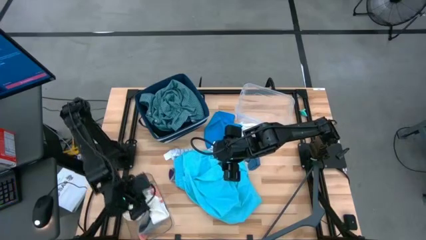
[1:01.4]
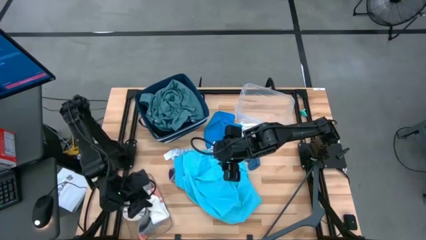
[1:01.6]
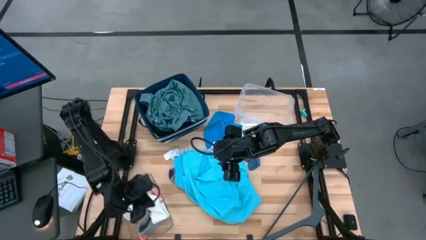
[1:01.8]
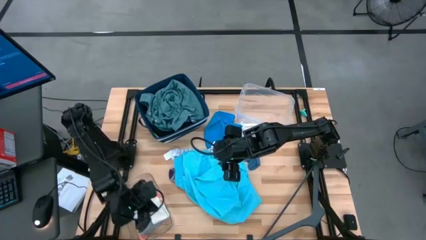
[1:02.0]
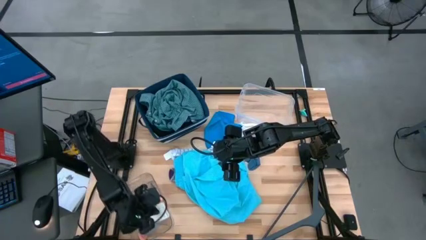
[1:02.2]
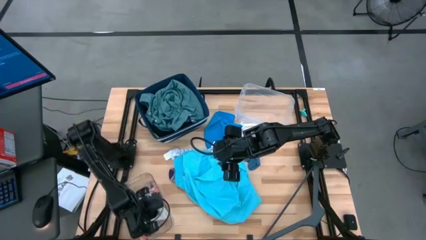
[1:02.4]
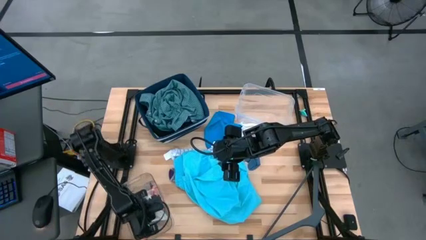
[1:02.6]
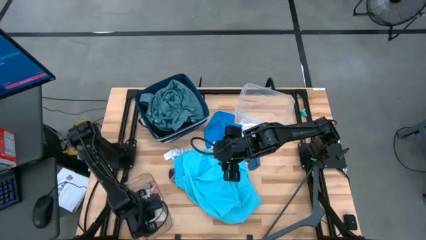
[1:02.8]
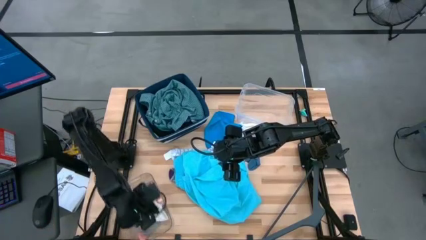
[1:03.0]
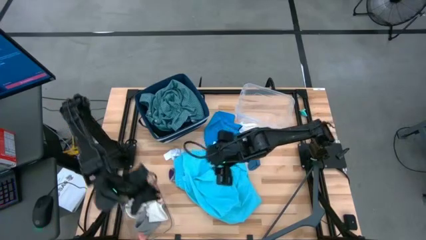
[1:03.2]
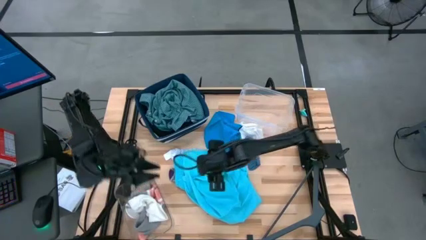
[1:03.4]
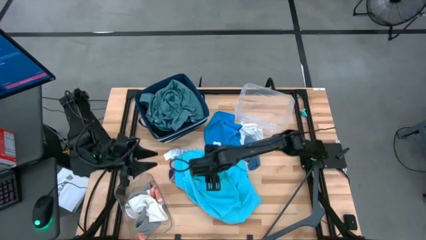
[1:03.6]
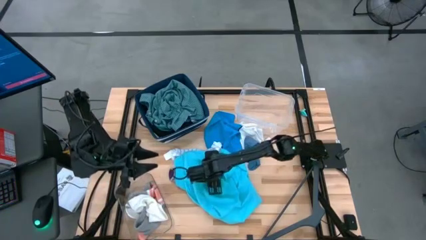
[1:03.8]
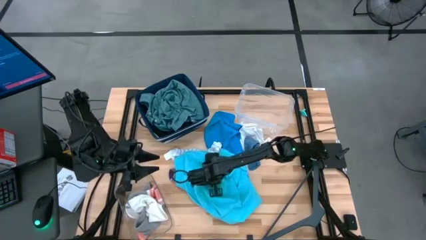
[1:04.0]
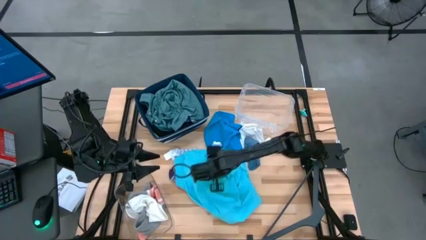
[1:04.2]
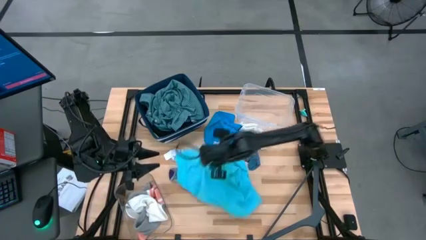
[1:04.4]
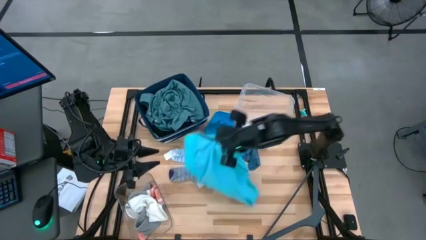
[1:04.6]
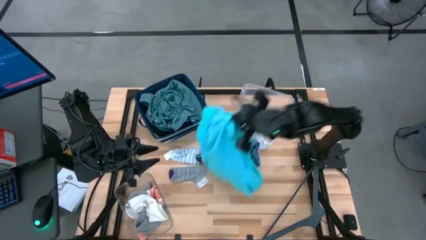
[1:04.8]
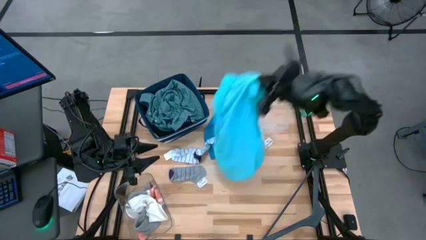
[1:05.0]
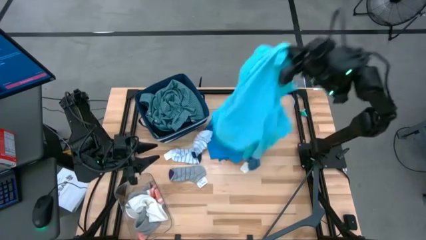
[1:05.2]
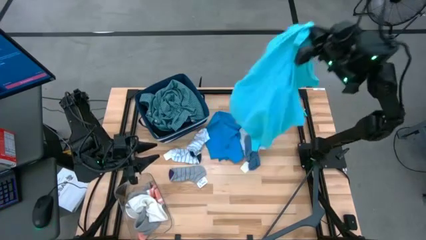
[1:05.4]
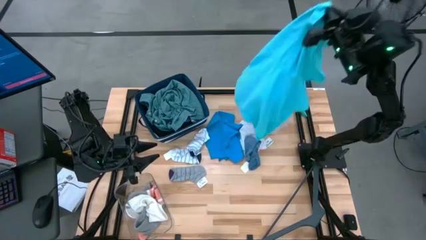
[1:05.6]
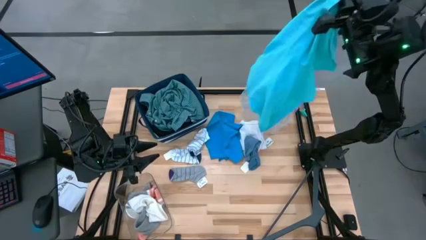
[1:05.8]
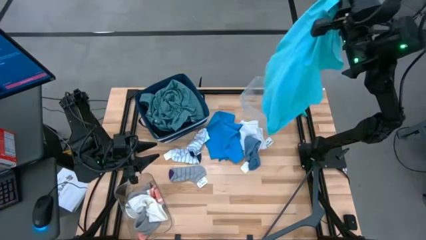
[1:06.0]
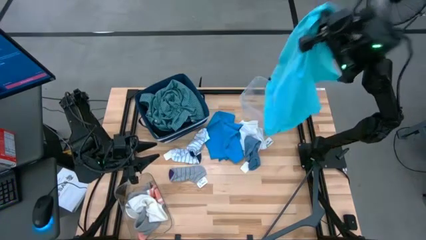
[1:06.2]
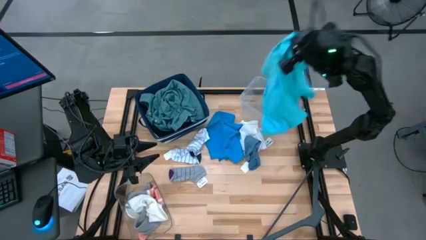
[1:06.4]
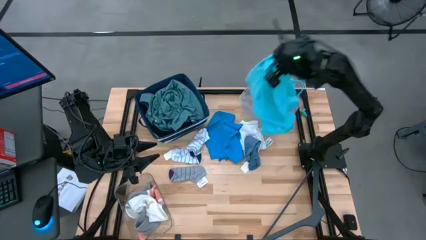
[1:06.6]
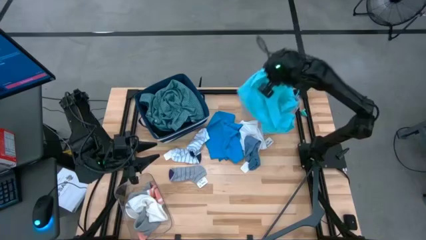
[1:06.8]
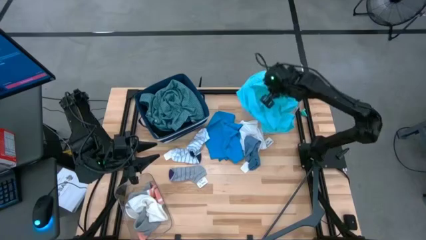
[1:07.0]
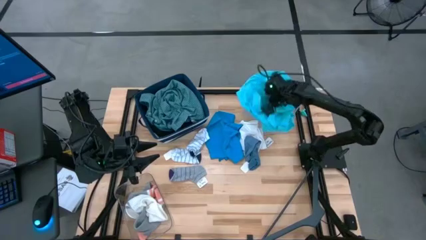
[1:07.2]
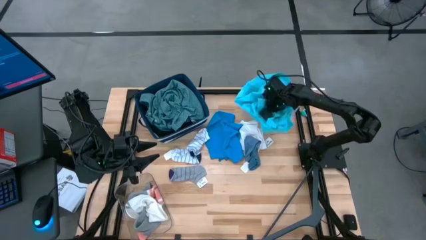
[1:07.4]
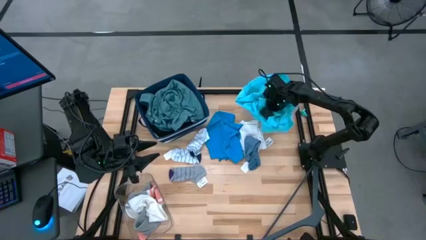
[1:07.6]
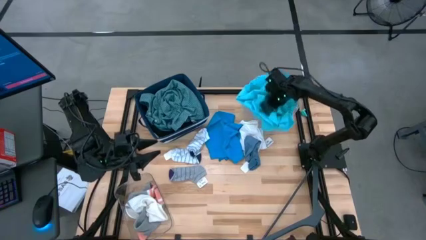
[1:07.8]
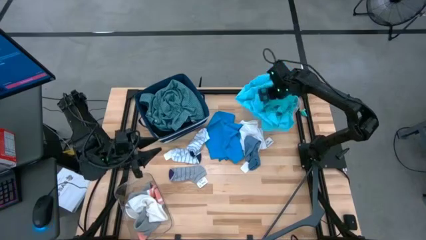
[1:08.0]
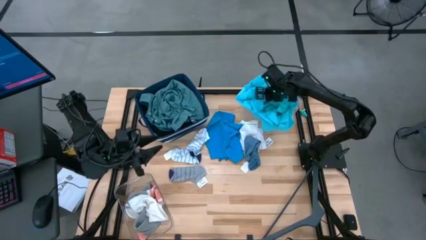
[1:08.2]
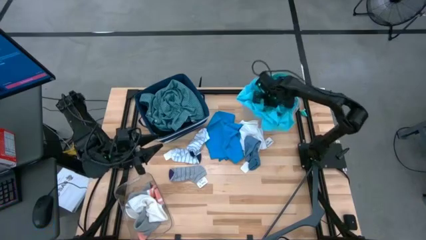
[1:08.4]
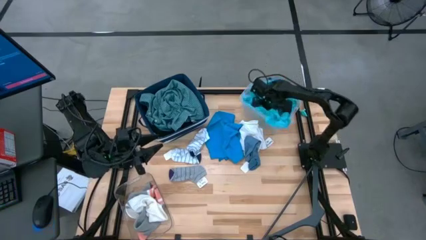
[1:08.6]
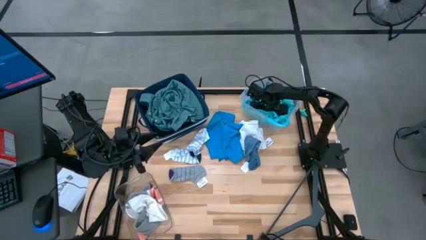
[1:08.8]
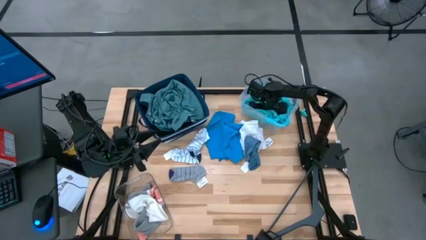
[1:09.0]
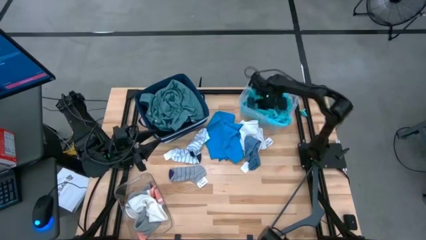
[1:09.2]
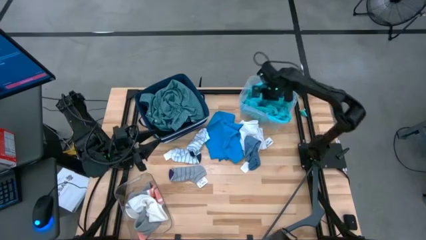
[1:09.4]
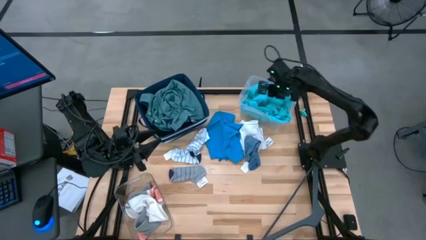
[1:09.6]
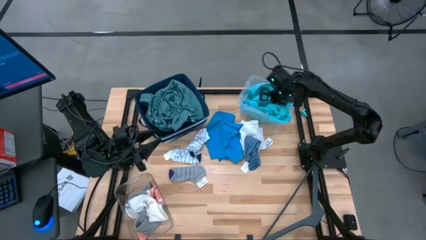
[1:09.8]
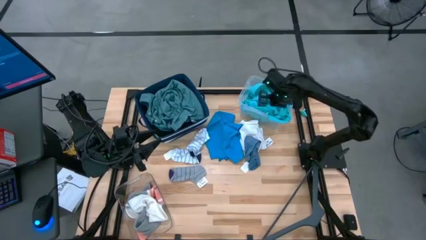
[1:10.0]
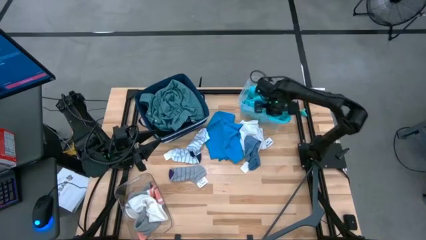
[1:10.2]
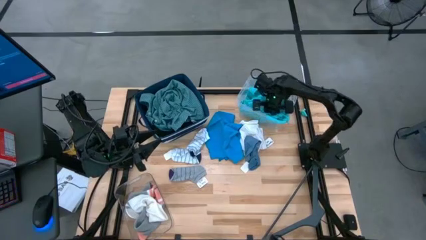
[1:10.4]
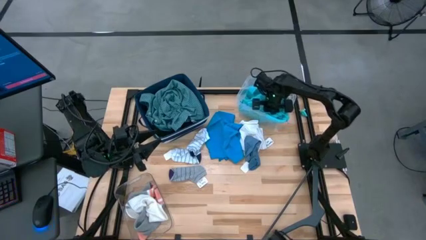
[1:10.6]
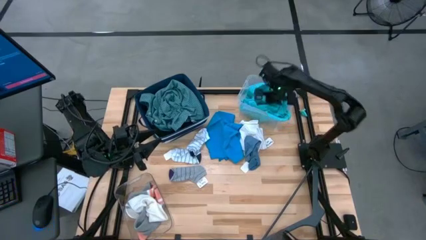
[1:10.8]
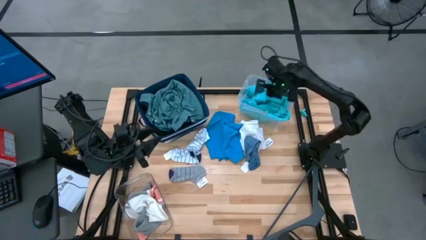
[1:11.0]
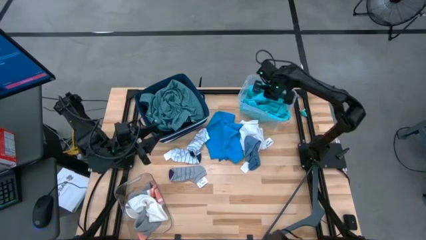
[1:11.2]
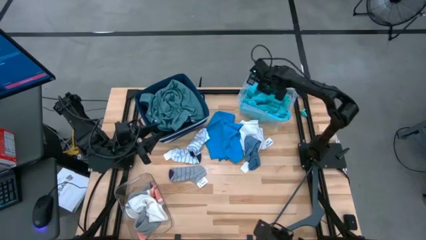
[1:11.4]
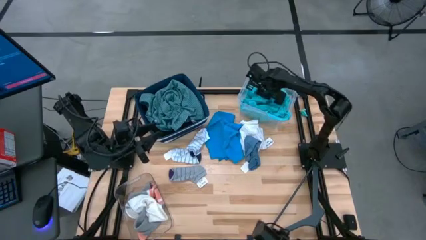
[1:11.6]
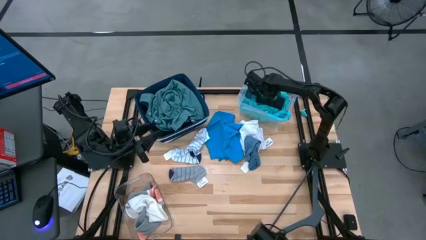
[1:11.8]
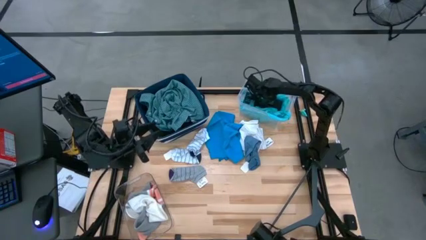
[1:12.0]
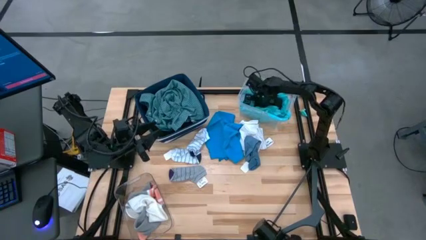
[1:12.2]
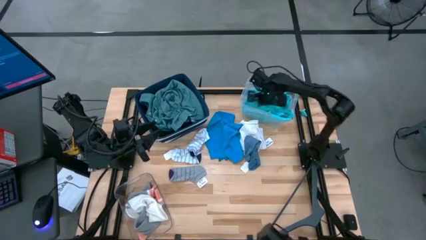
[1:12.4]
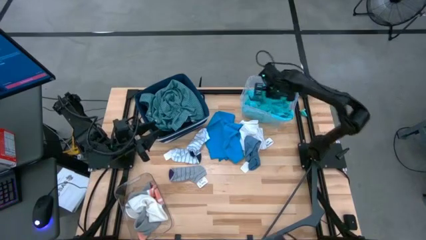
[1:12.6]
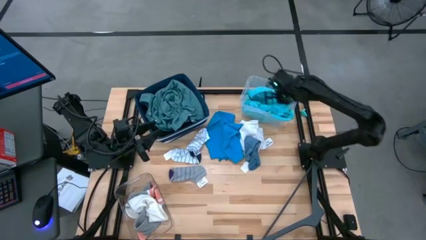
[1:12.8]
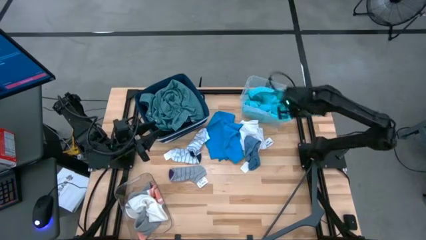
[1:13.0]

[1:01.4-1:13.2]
Task: Pick & Place Cloths
Put the light blue shorts into the white bin
